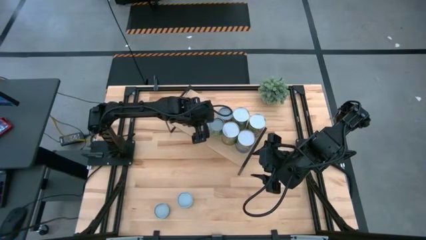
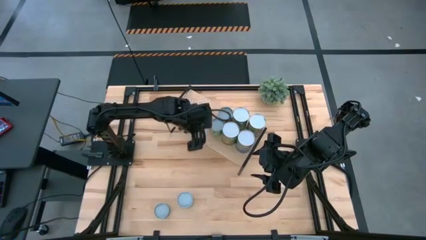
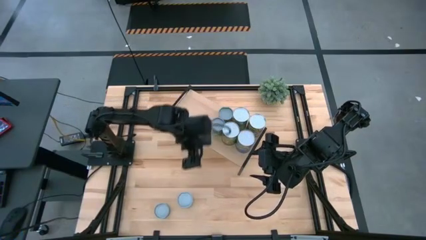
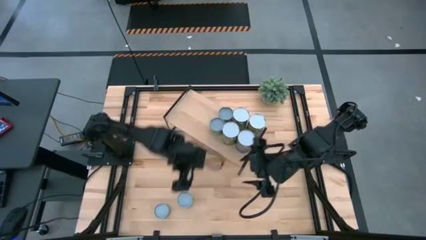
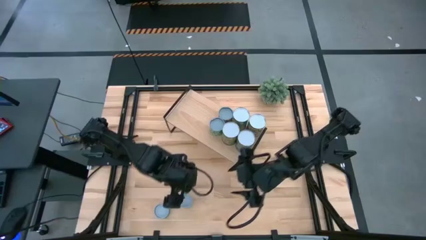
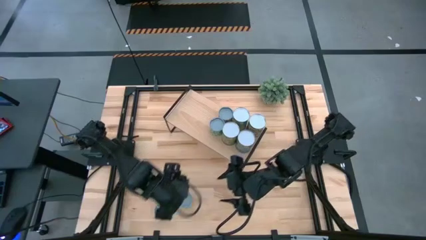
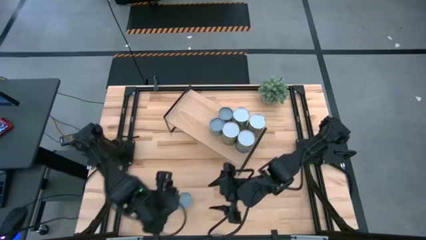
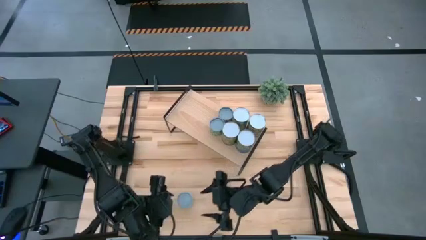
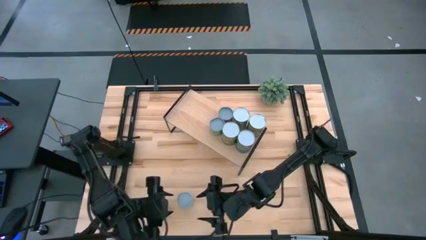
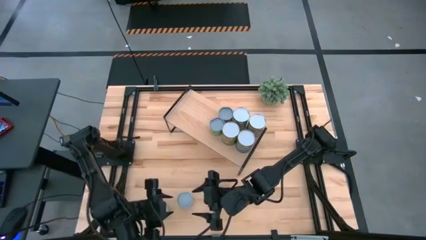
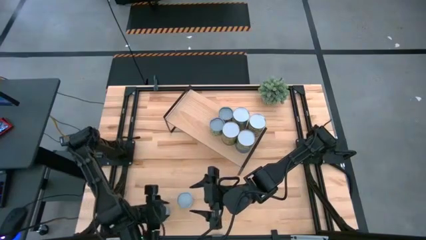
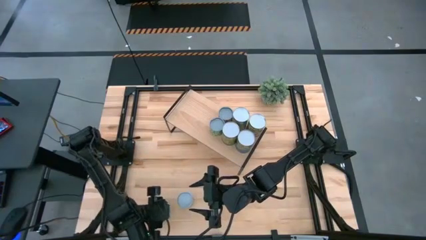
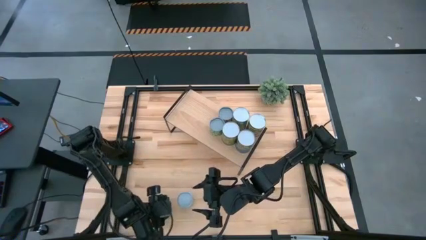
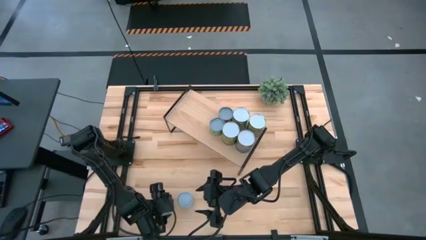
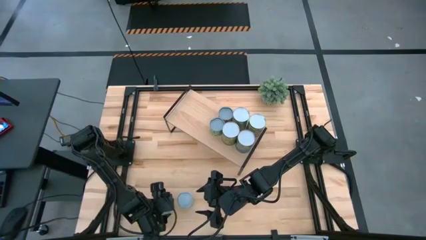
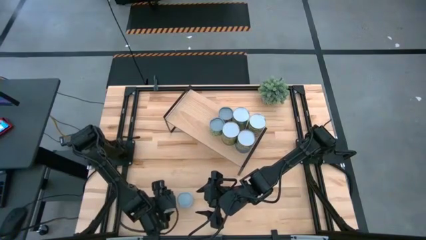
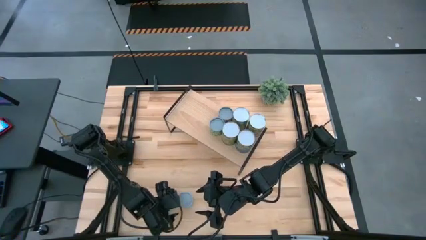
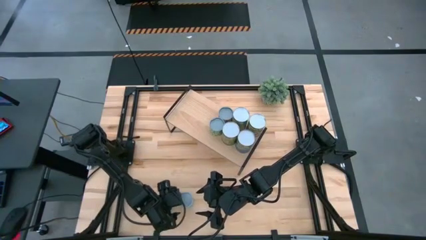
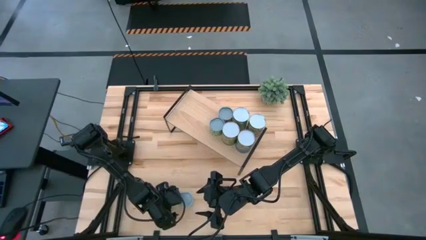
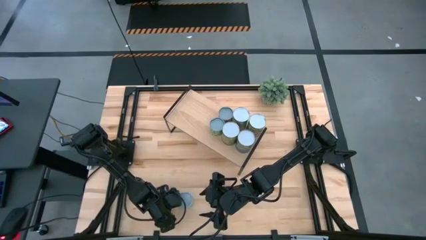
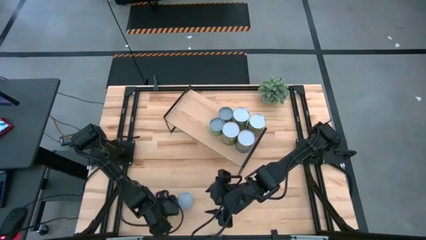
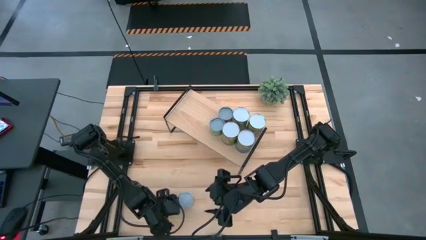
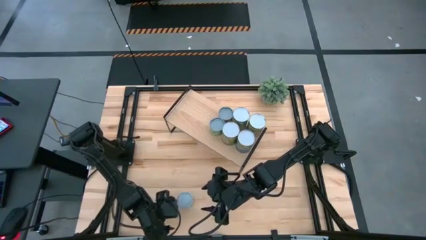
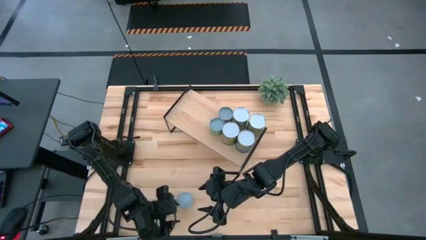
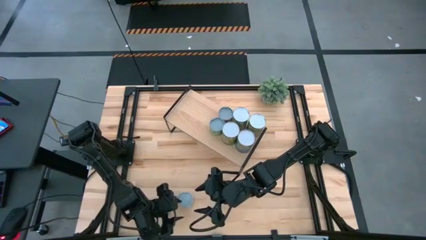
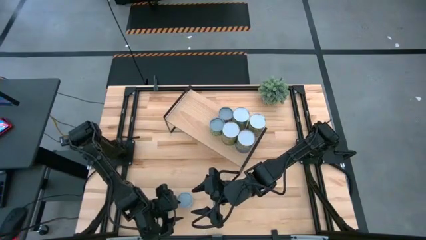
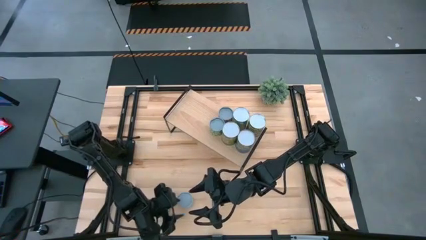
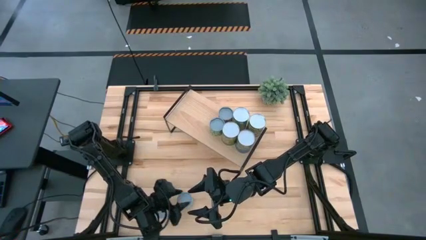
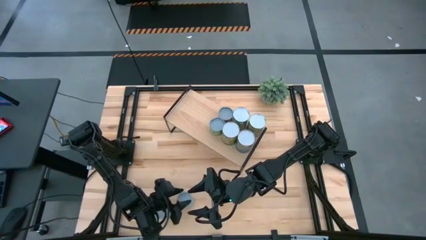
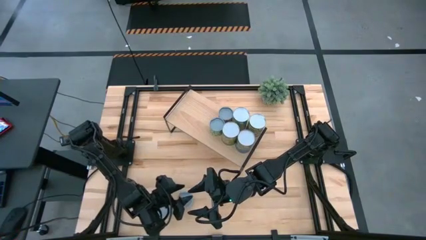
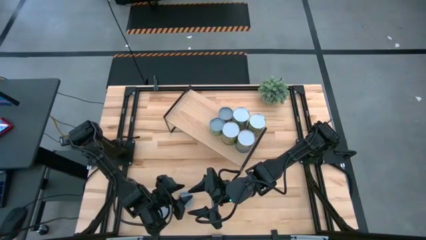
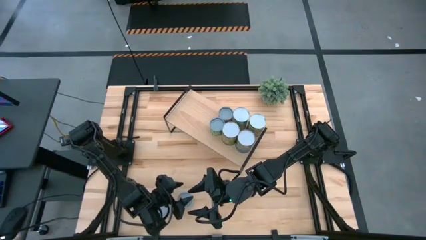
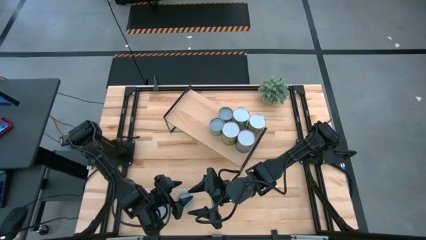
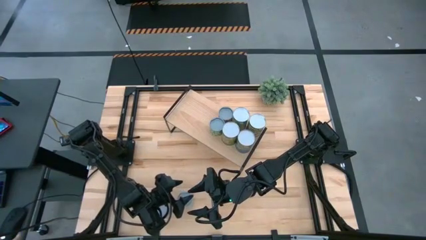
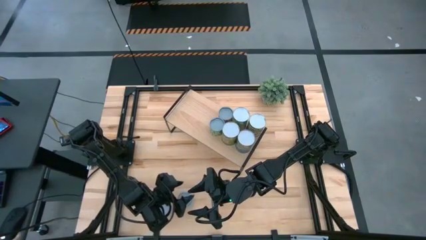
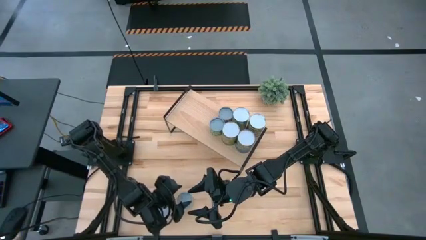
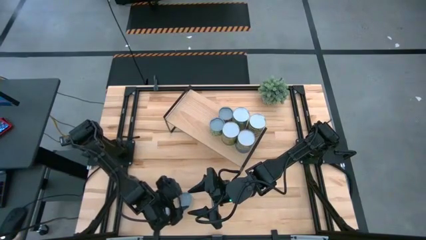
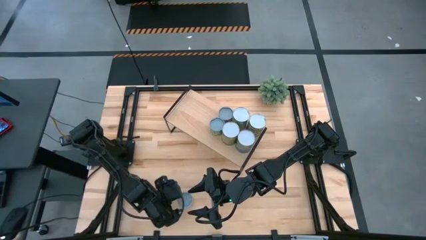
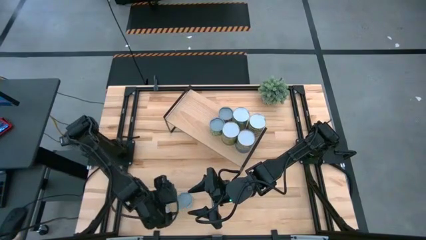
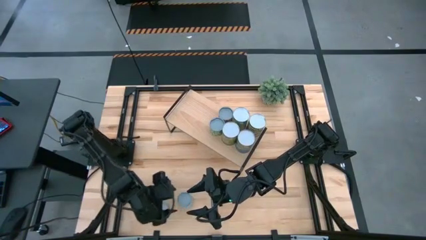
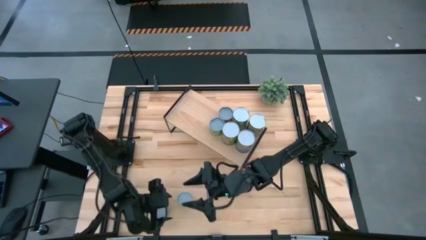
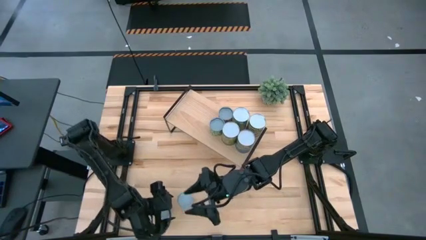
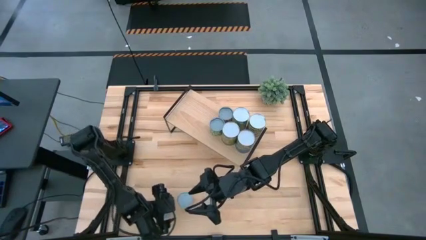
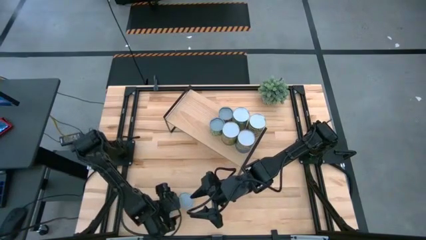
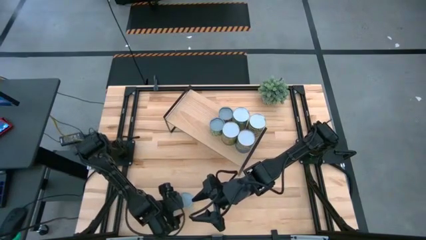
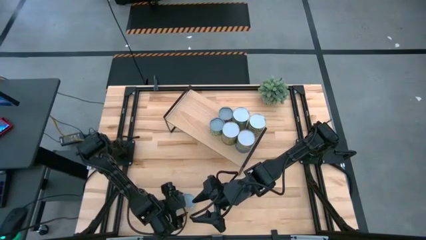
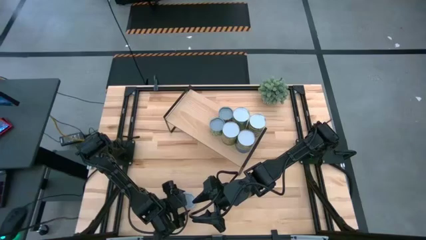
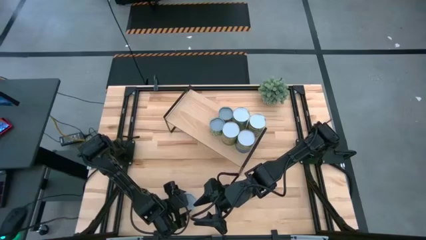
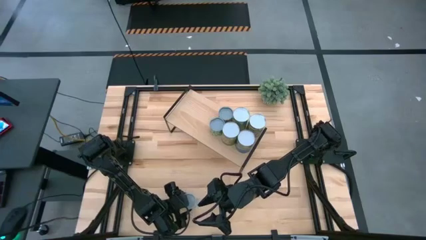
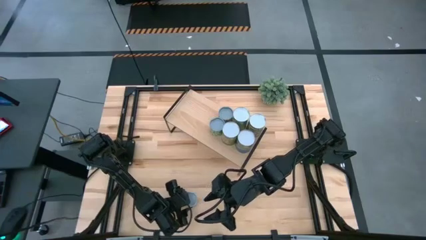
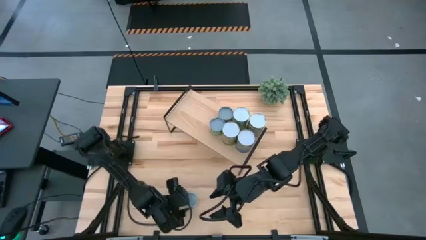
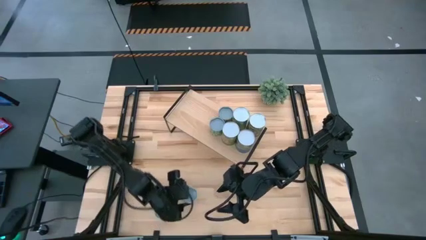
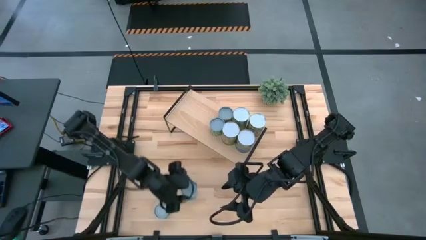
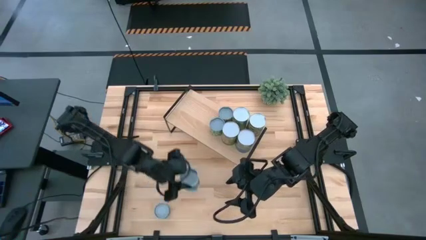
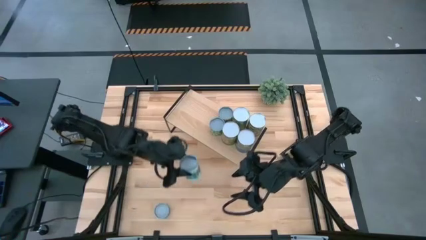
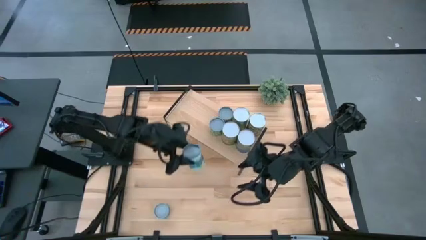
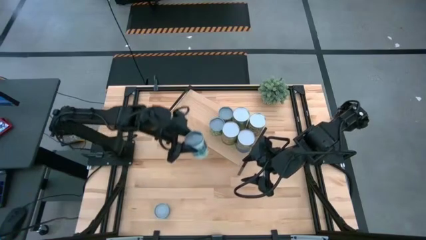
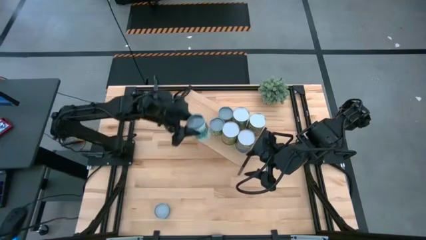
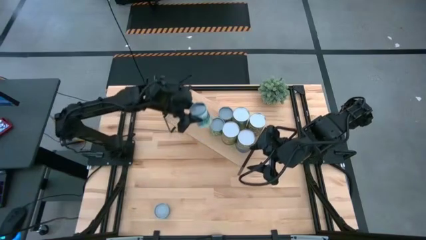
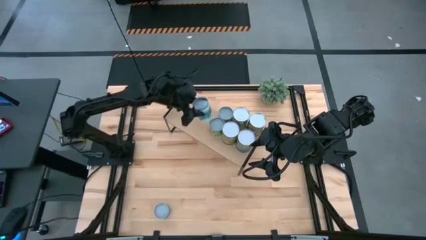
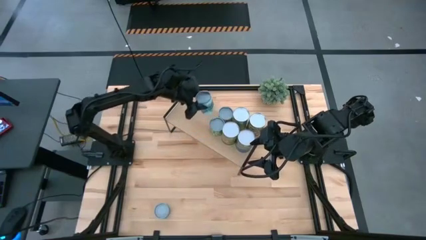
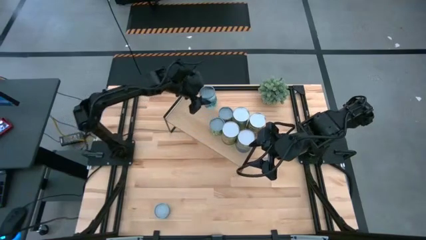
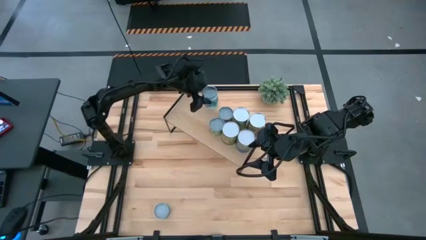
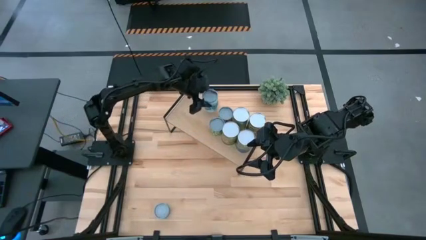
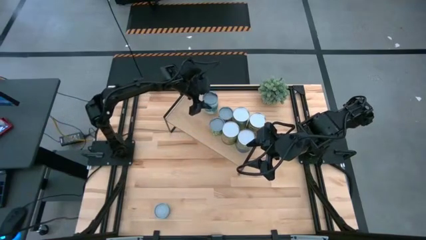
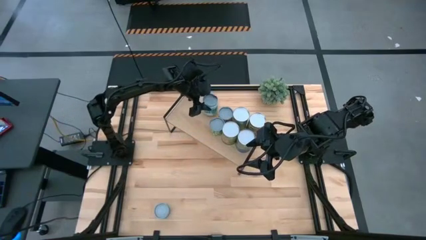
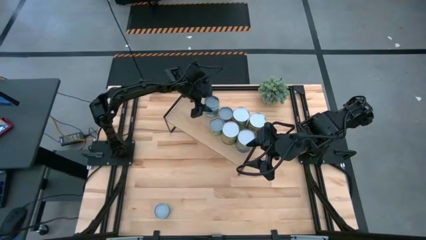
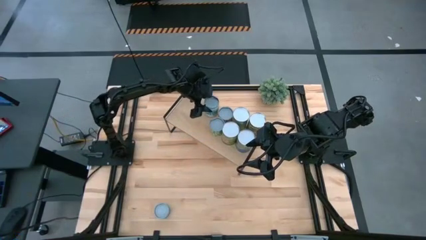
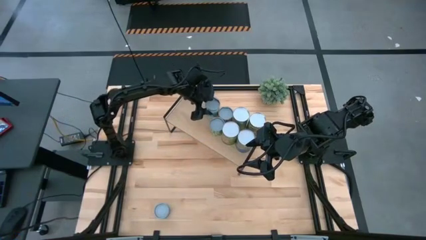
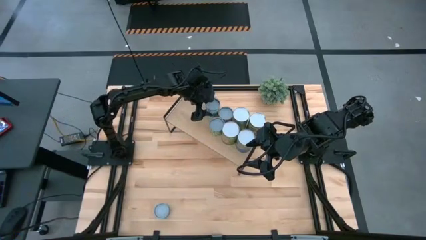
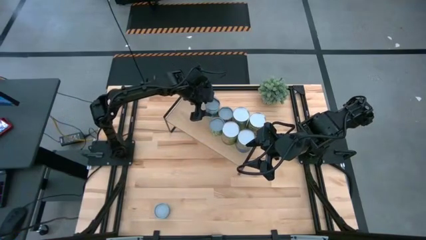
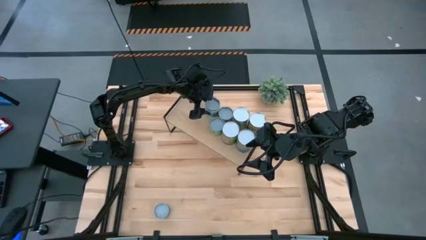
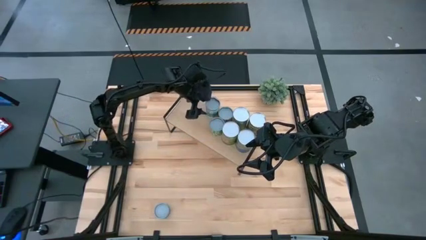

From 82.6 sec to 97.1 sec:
Task: Pick and place cans onto a shelf
Put the canned mixed vegetable on the shelf

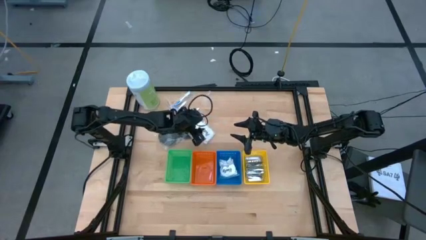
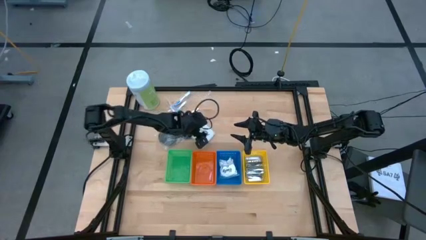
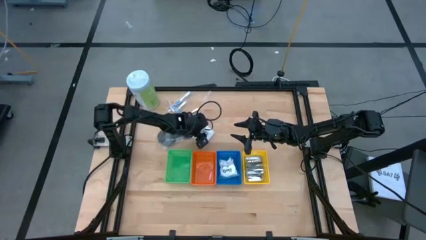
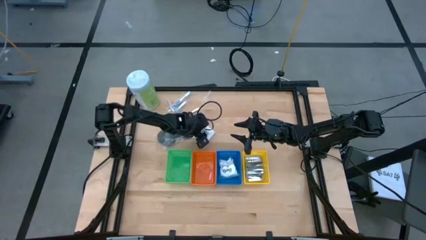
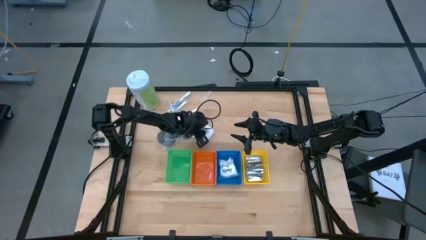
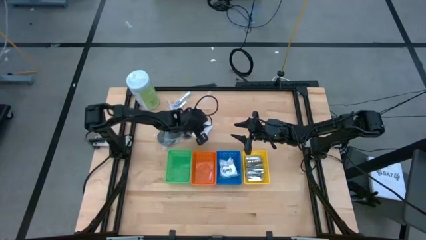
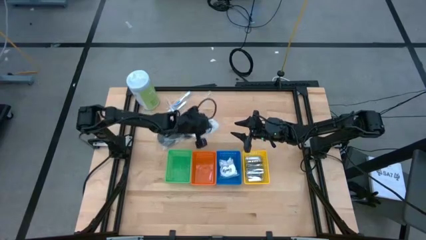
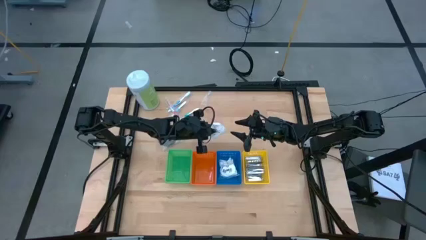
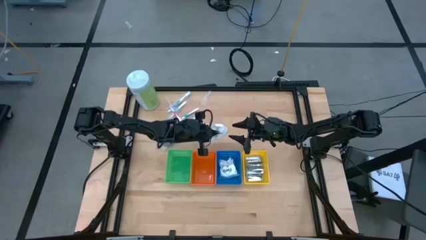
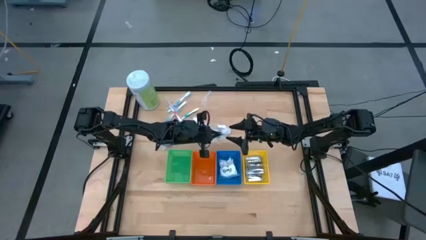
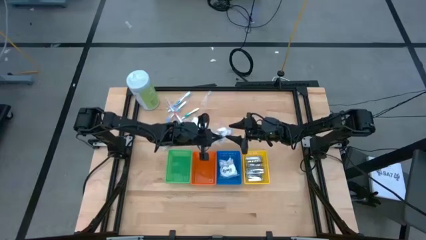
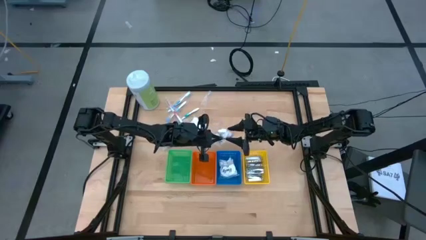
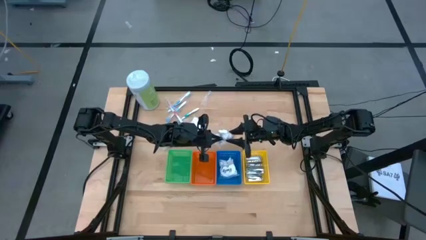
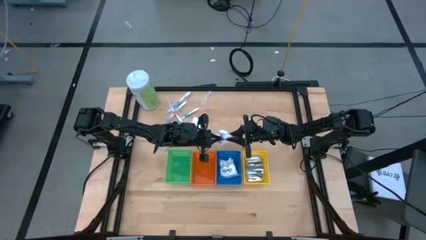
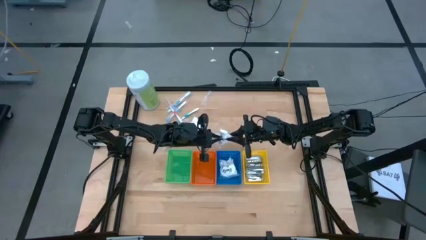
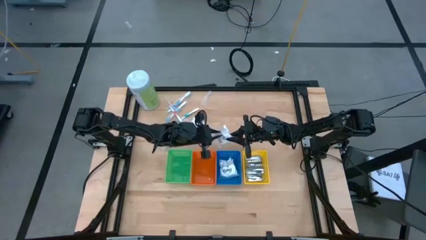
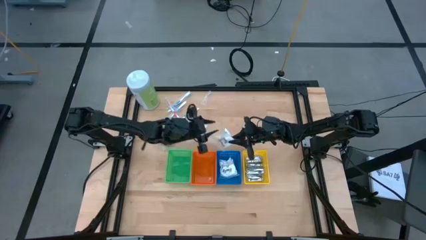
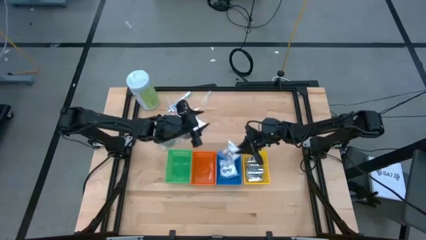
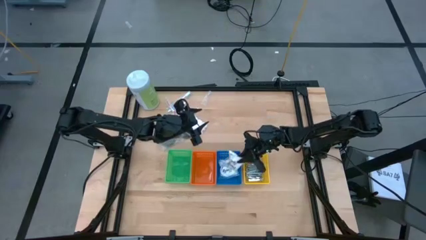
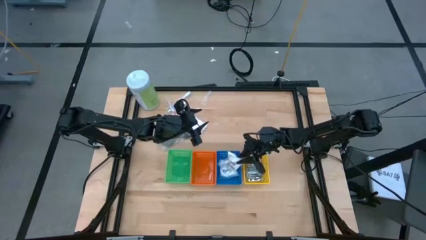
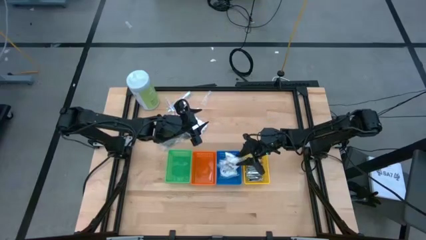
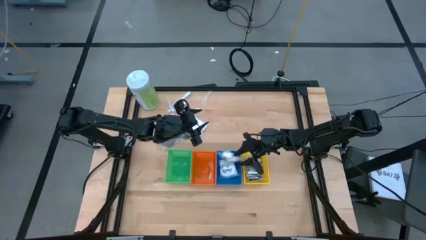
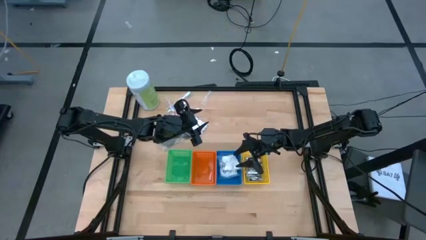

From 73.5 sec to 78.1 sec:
Task: Pick & Place Travel size toiletries
Put the cotton pack into the blue basket
